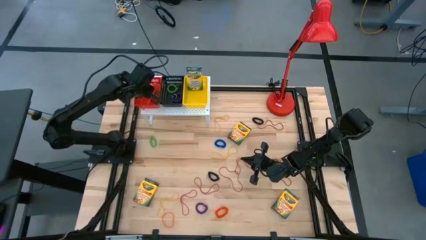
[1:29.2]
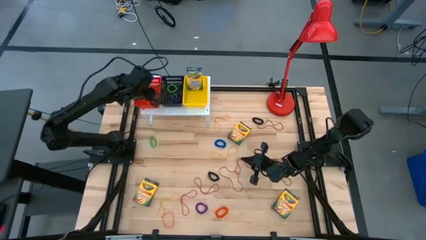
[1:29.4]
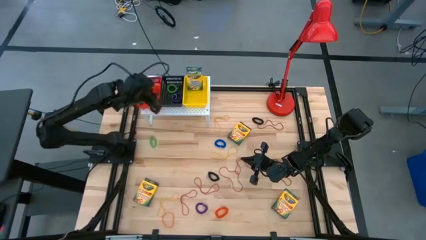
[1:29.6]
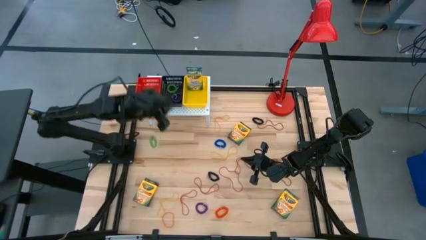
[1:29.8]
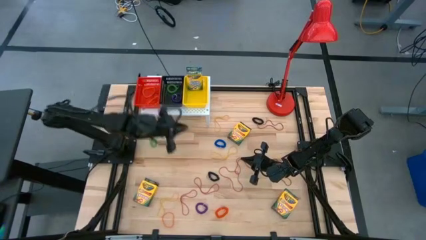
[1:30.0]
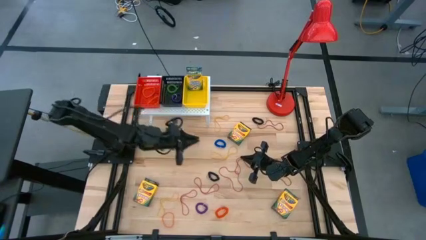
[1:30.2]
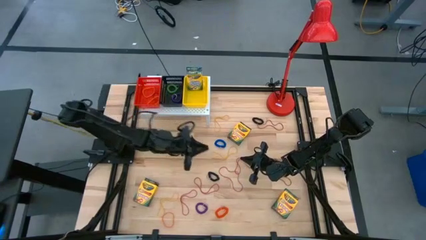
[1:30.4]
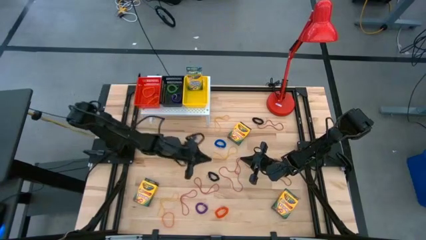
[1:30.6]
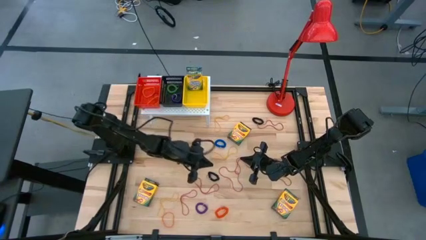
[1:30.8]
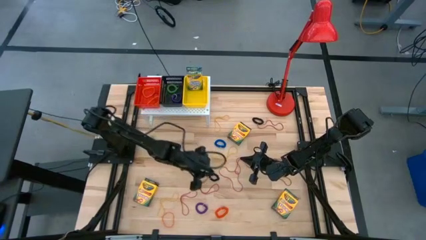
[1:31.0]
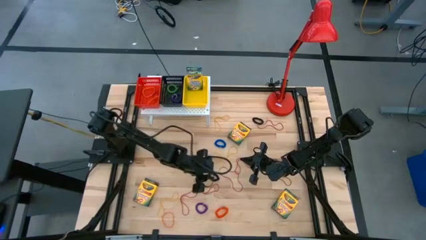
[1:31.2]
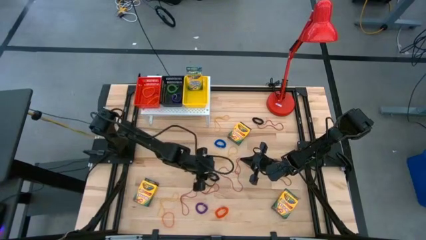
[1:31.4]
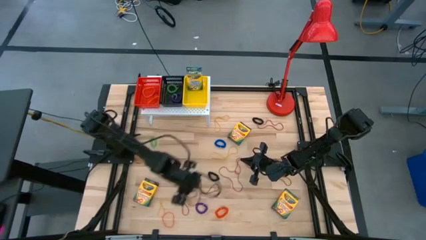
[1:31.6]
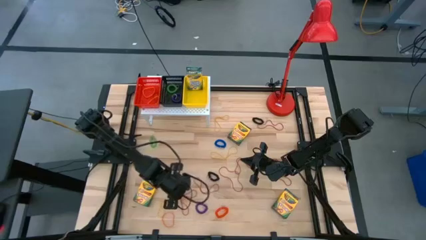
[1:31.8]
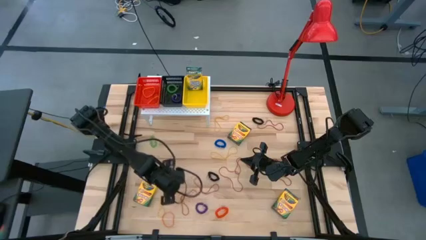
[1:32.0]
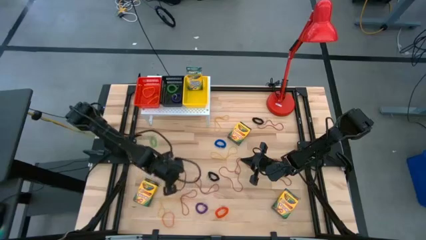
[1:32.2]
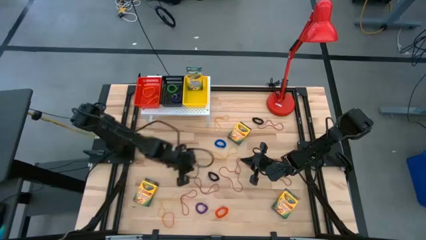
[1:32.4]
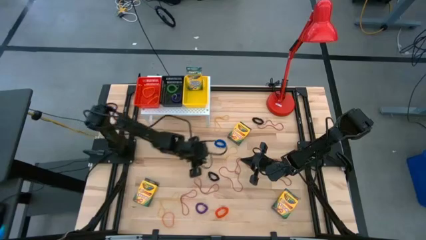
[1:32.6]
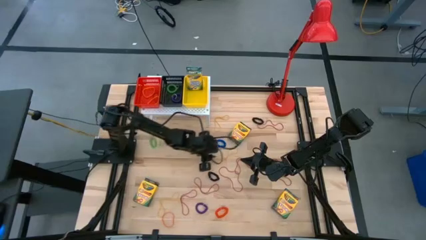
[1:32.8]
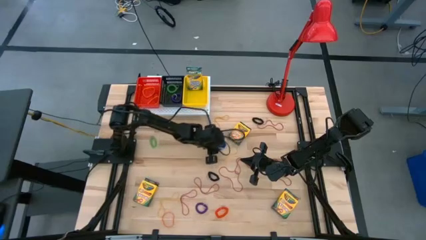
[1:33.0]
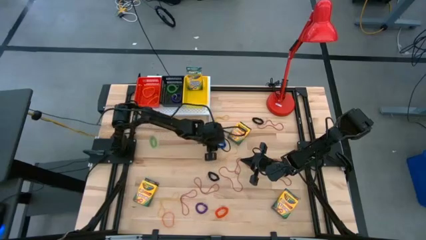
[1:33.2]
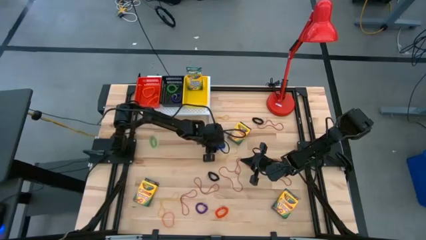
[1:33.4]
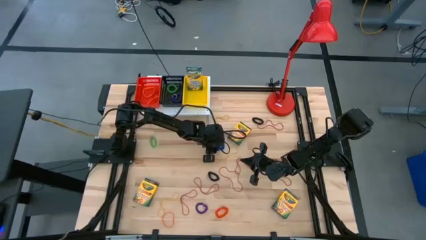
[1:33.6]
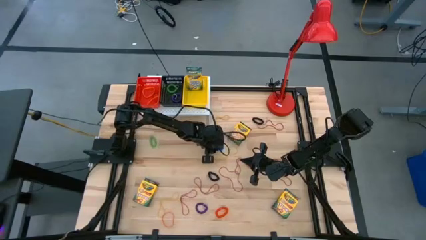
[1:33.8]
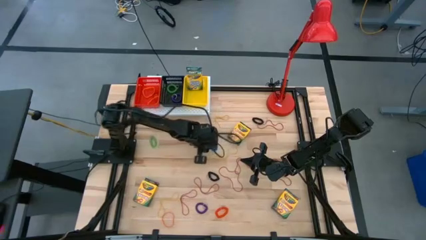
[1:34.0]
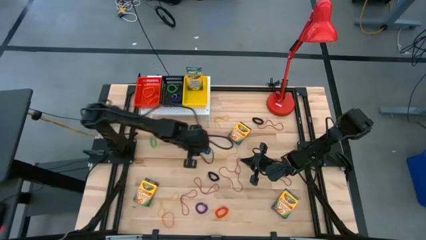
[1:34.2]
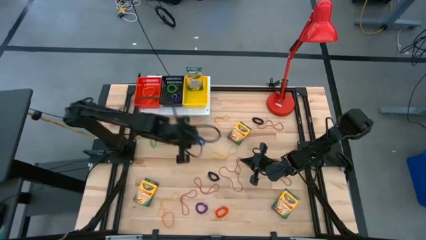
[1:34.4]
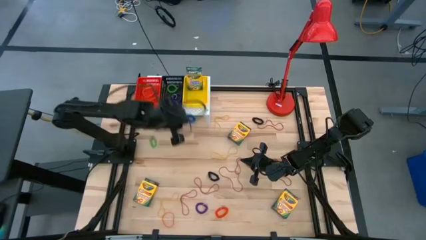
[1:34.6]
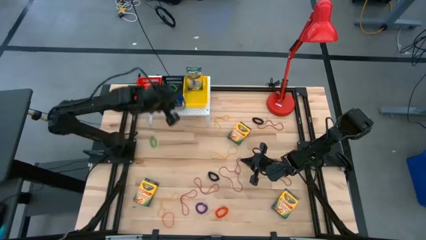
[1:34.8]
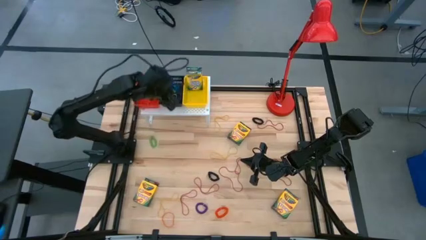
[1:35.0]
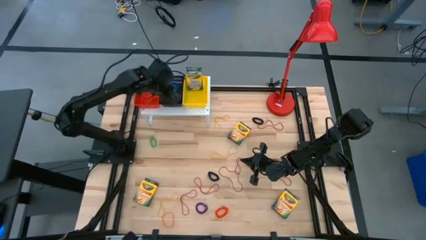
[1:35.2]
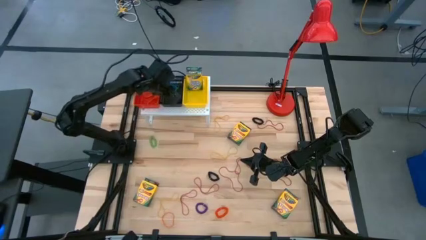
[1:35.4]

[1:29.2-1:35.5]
Task: Pick & Place Office Desk Supplies
Put the blue spring keychain into the black bin on the shelf

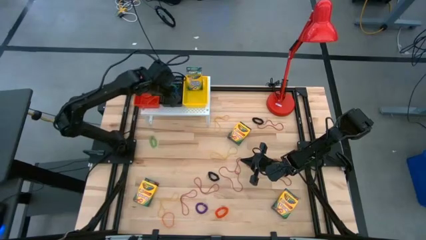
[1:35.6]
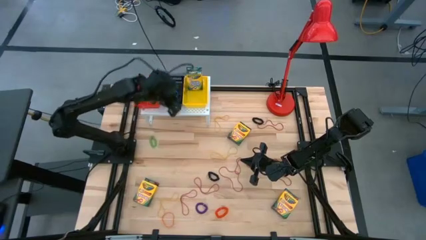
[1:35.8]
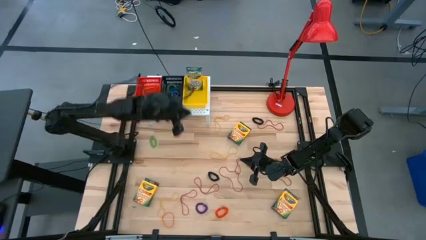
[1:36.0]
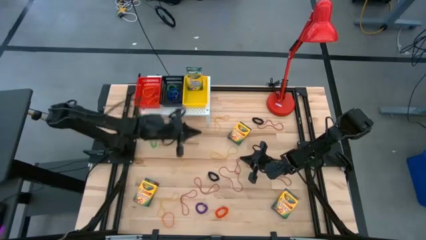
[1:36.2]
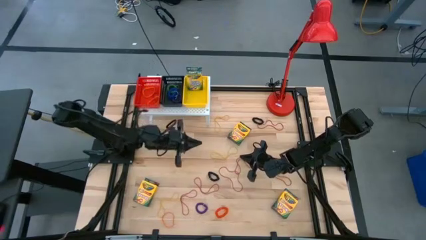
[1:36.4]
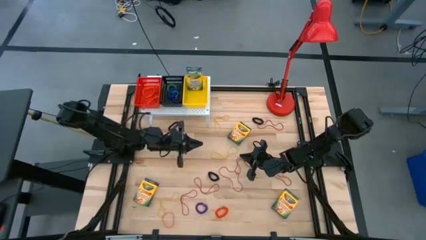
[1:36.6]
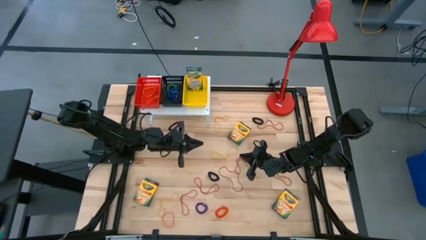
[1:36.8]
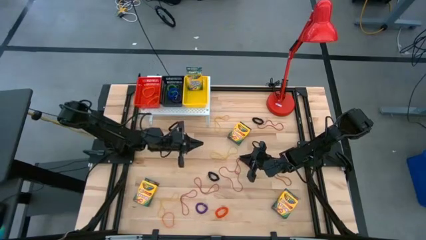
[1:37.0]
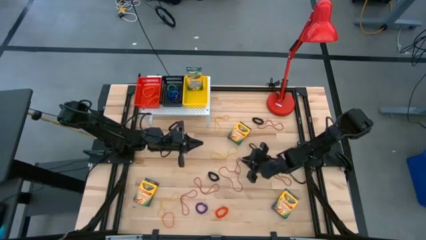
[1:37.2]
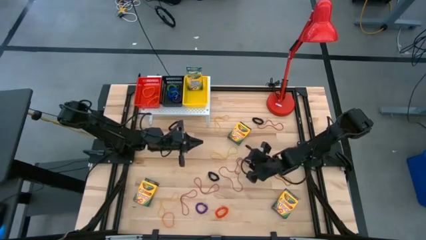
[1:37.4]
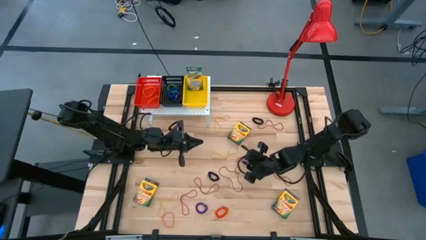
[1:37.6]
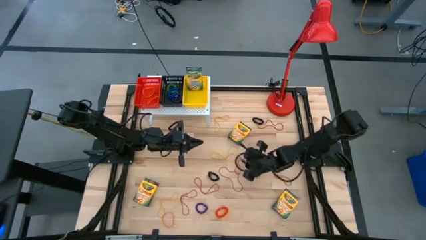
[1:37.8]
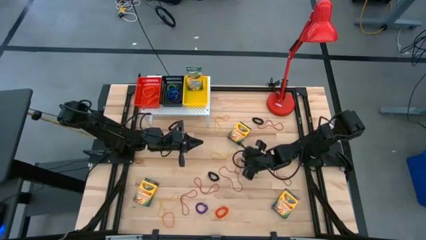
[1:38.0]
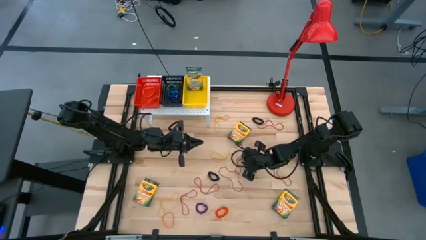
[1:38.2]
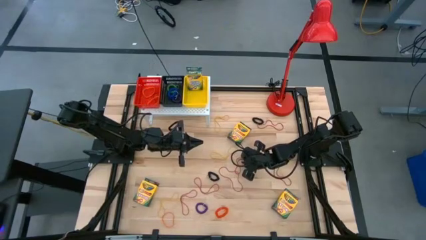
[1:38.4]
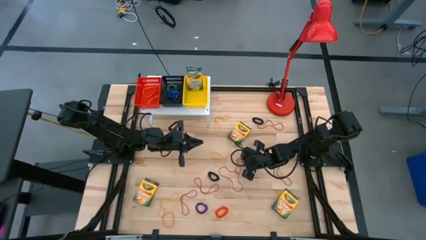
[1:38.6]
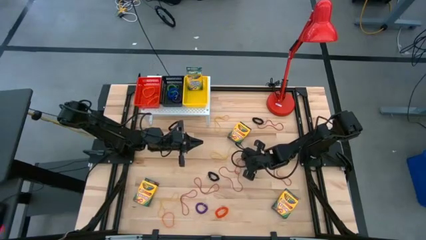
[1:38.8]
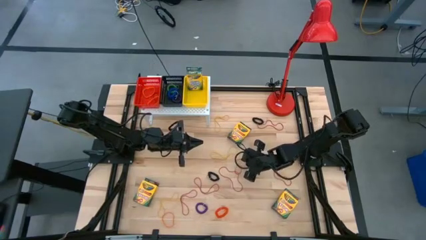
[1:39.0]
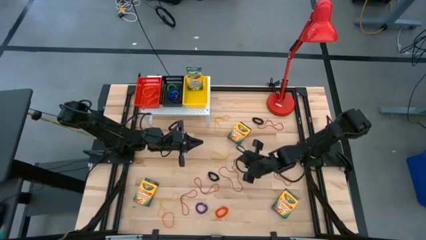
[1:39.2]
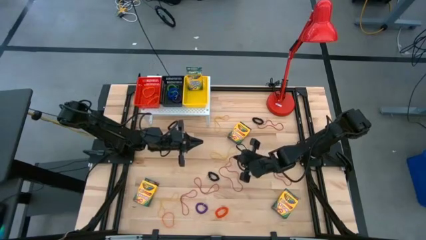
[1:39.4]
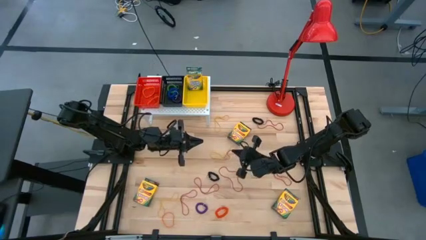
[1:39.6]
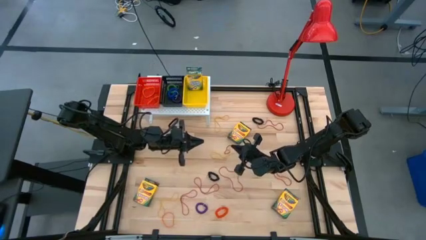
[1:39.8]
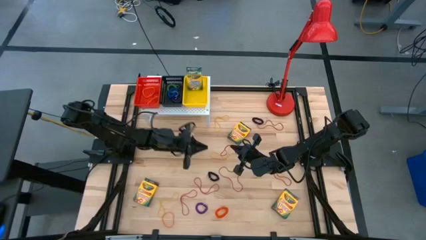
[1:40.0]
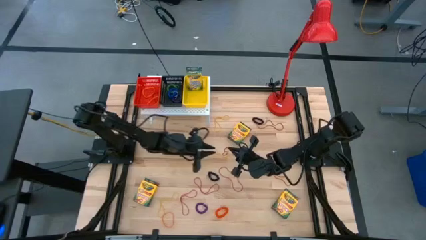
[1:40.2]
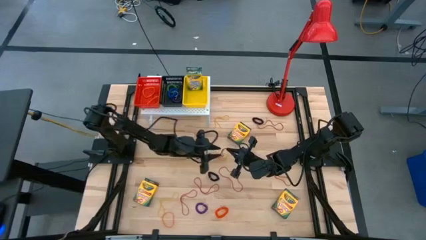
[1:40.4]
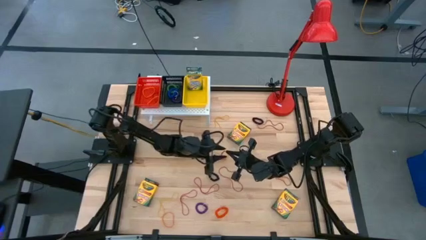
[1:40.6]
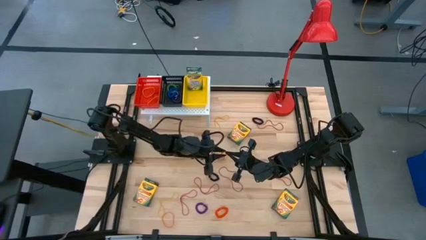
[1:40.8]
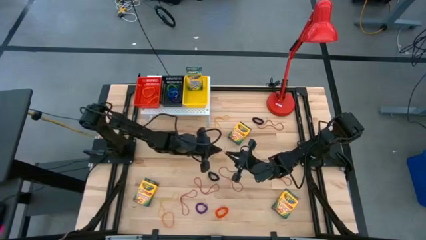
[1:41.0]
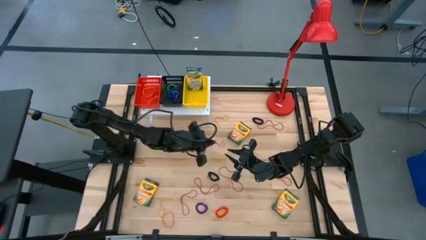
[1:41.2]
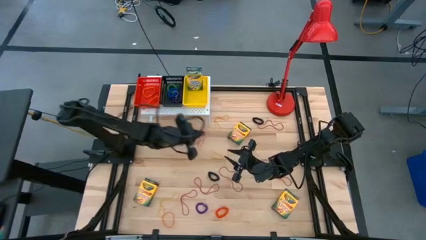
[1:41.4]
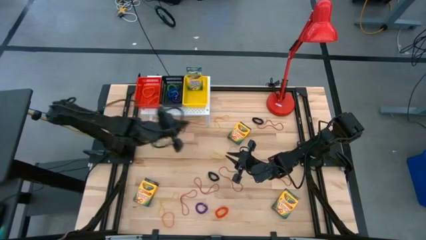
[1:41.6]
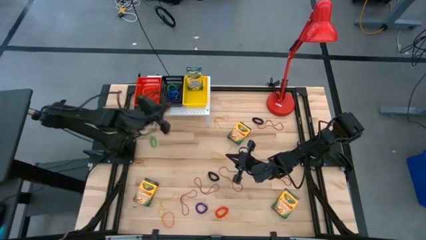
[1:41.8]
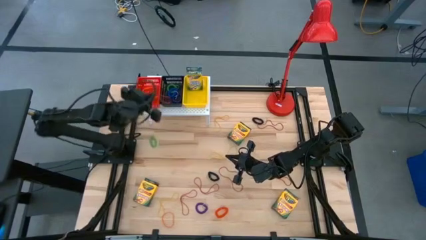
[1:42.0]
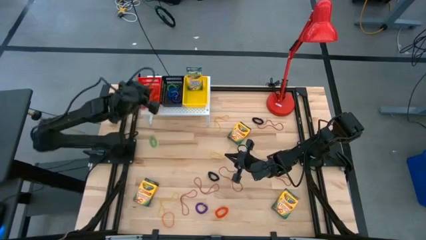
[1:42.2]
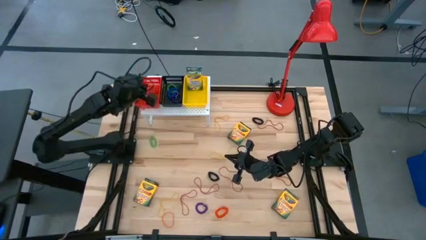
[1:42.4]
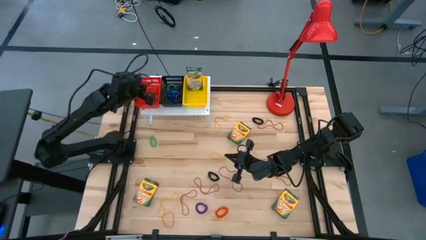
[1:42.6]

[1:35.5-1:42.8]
Put the red rubber band into the red bin on the shelf

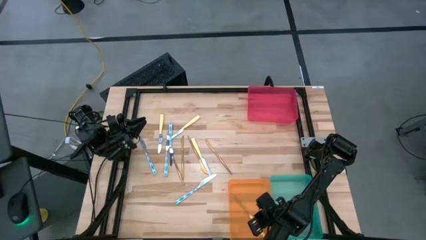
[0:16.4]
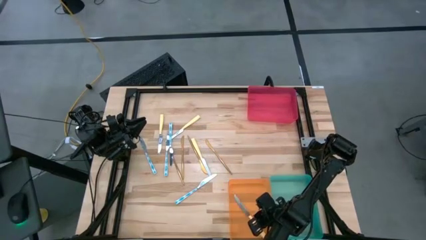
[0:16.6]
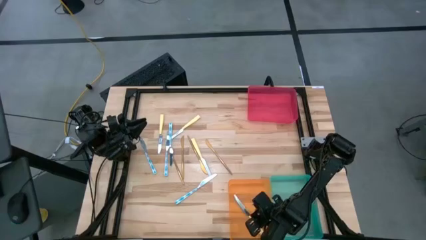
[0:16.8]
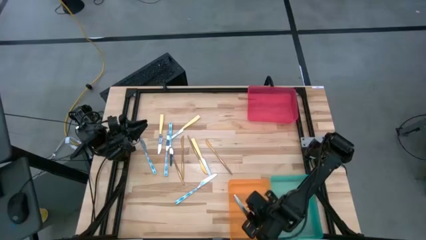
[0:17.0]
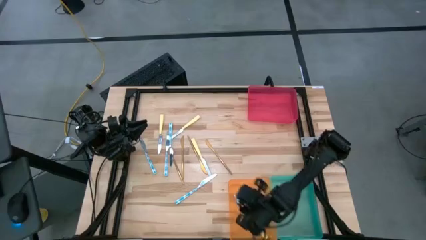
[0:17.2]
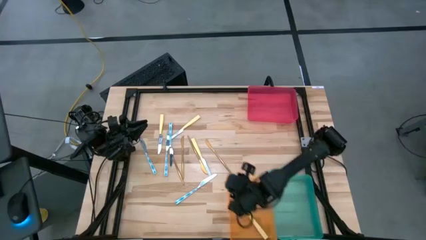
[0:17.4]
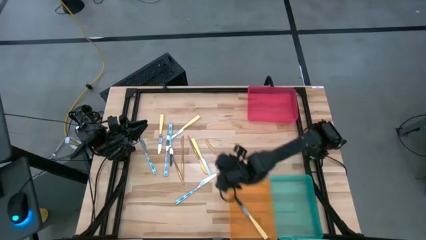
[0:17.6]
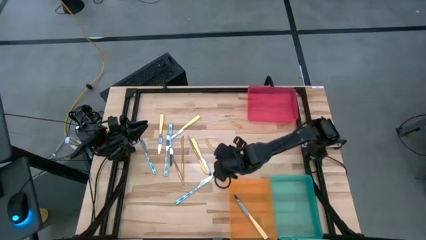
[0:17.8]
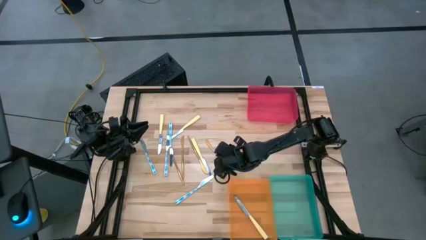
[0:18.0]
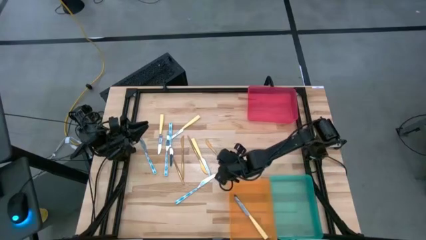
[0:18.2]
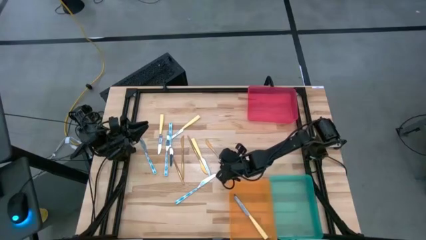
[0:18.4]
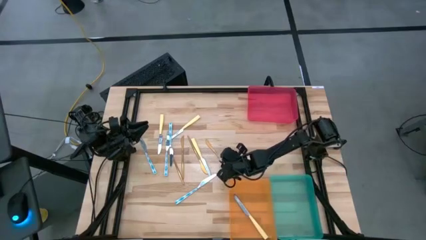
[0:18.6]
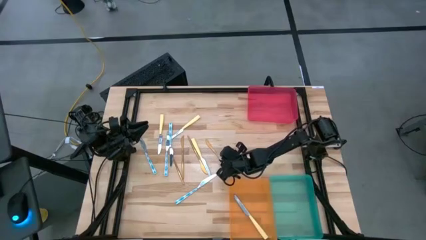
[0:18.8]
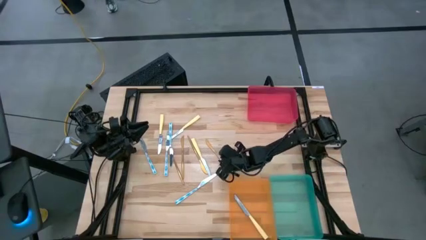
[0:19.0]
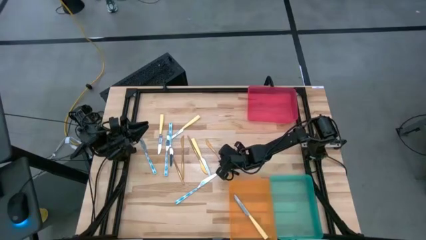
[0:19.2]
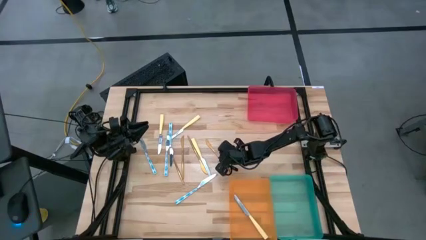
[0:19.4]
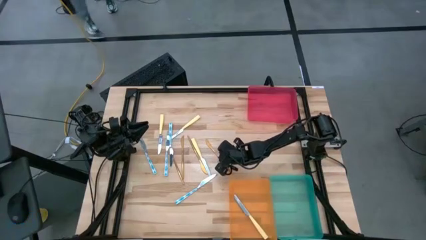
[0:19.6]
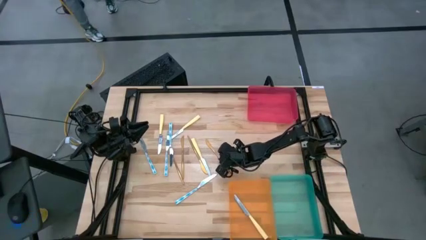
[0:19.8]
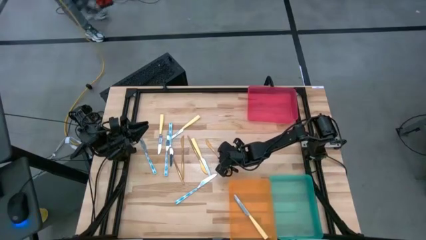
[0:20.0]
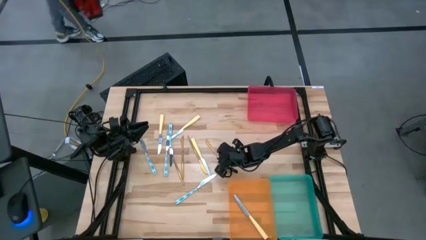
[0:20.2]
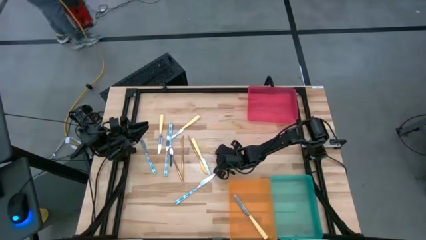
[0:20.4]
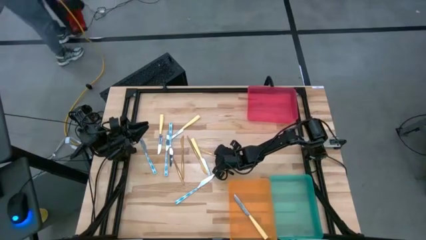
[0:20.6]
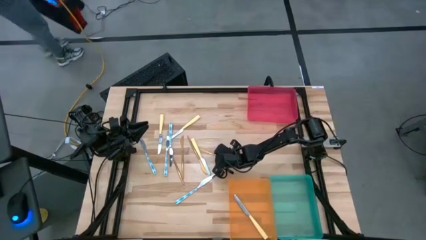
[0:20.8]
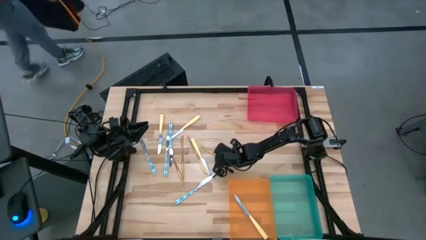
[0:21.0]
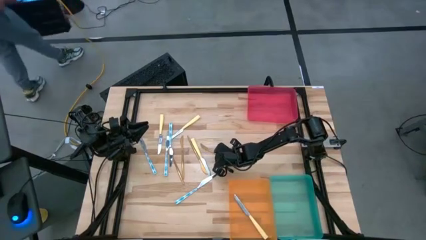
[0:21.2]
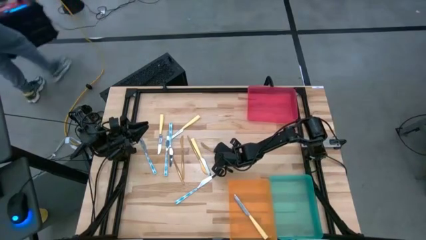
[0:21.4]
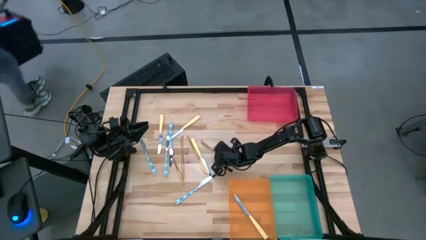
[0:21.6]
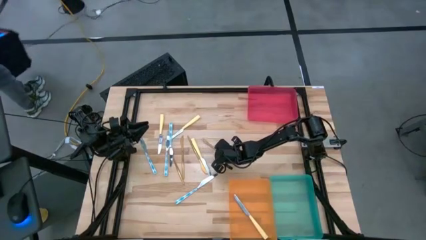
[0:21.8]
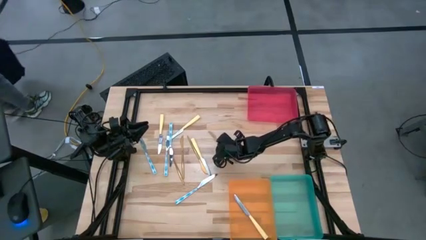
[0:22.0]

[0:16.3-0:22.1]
Task: Sort silverware by color (type)
Put the gold knife into the blue bin
